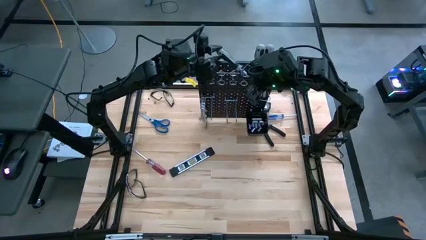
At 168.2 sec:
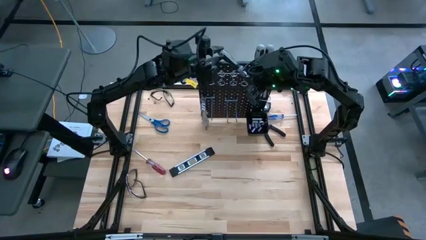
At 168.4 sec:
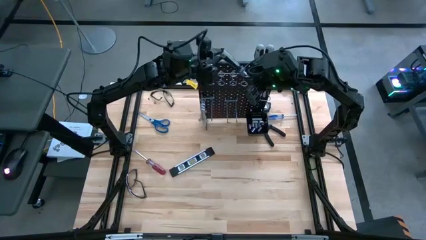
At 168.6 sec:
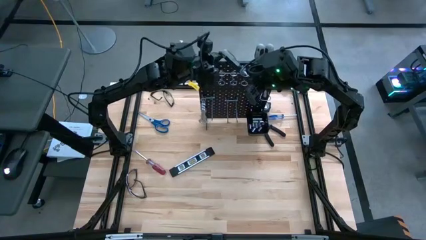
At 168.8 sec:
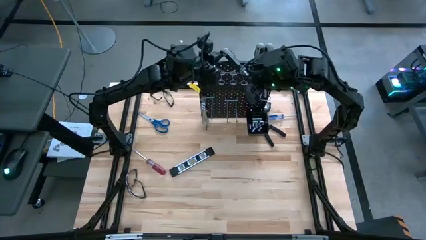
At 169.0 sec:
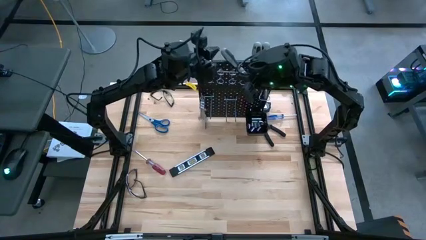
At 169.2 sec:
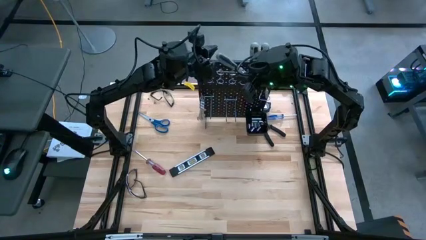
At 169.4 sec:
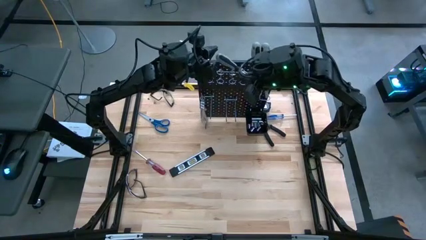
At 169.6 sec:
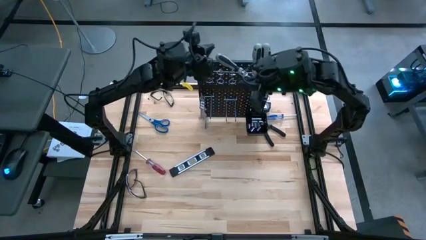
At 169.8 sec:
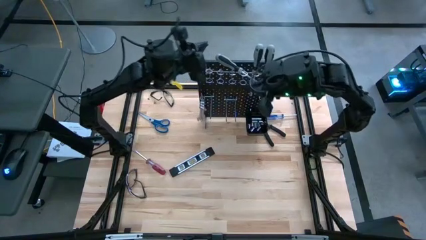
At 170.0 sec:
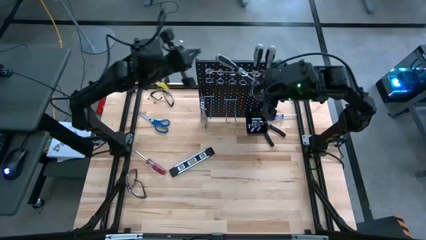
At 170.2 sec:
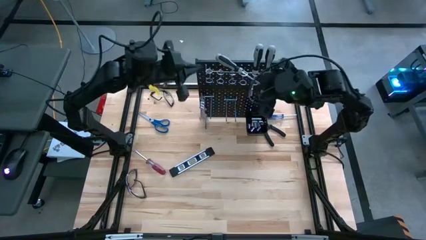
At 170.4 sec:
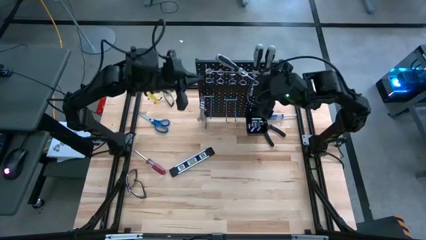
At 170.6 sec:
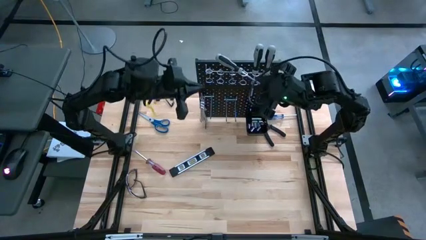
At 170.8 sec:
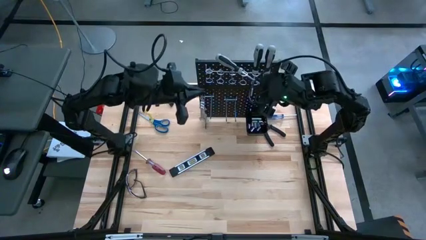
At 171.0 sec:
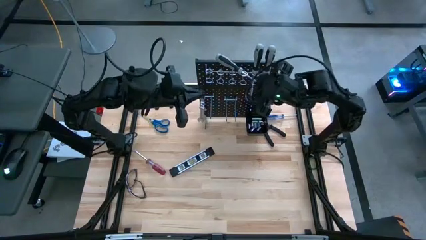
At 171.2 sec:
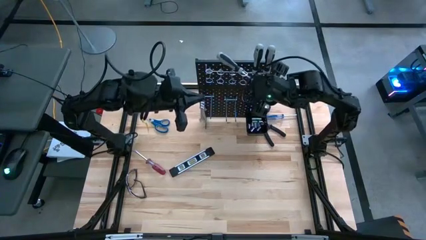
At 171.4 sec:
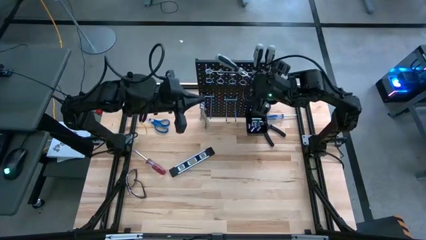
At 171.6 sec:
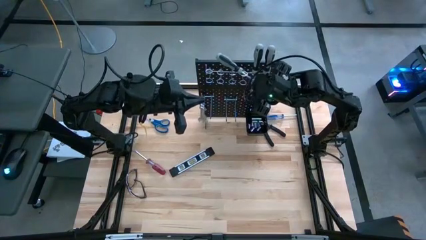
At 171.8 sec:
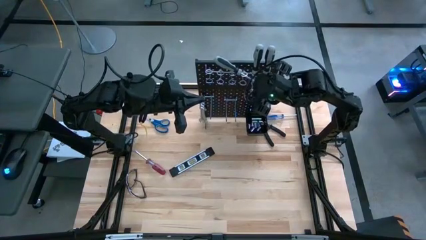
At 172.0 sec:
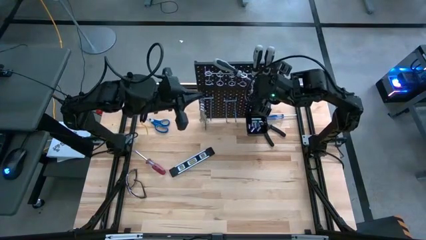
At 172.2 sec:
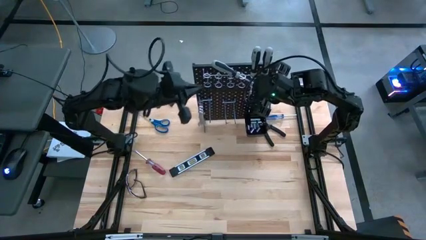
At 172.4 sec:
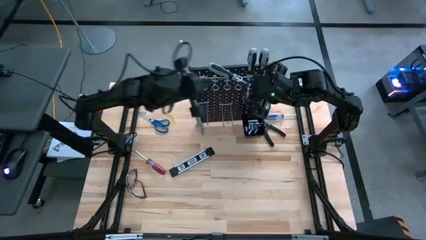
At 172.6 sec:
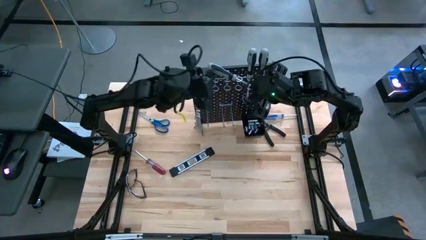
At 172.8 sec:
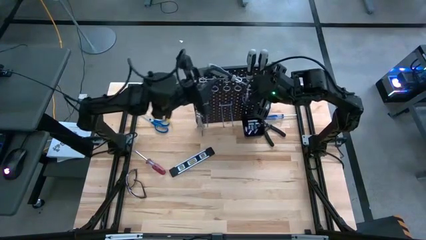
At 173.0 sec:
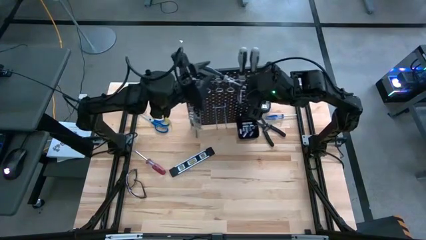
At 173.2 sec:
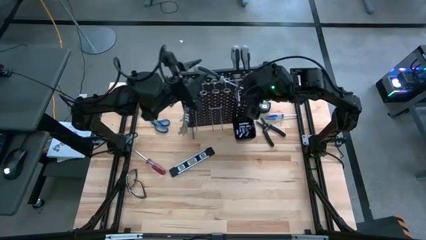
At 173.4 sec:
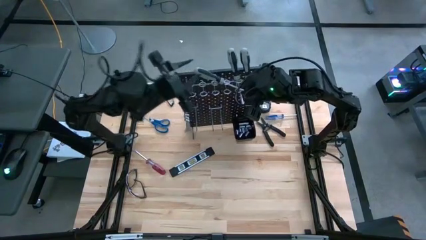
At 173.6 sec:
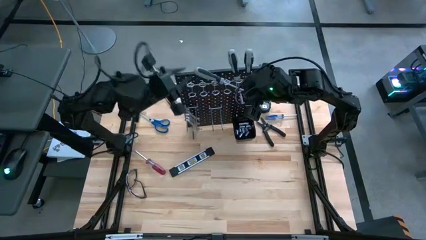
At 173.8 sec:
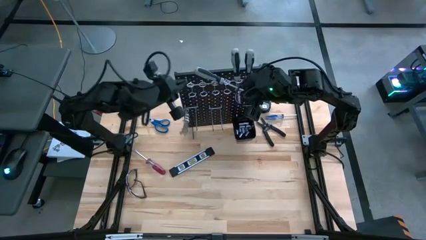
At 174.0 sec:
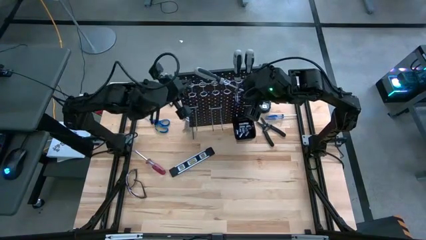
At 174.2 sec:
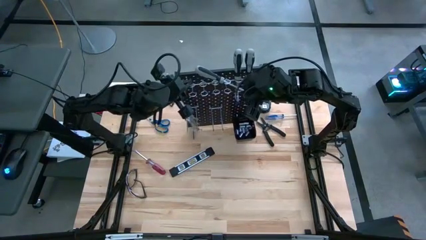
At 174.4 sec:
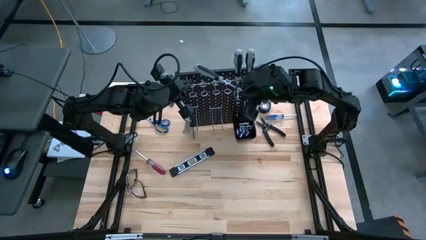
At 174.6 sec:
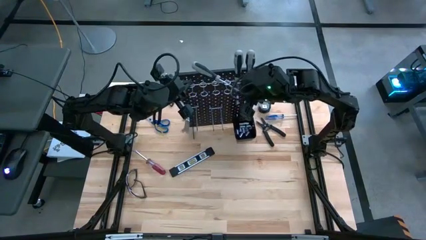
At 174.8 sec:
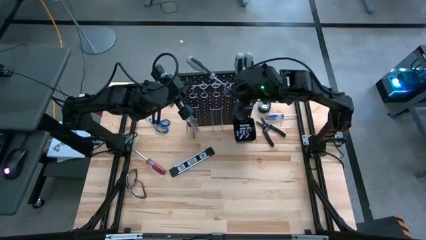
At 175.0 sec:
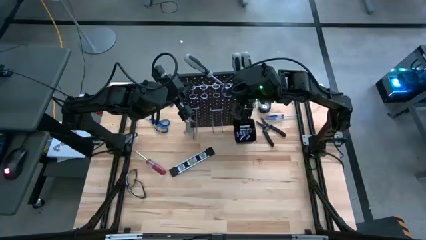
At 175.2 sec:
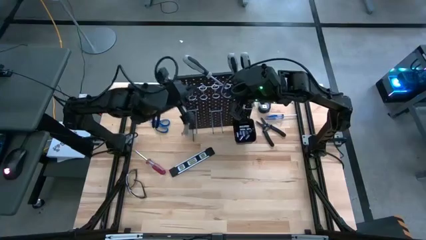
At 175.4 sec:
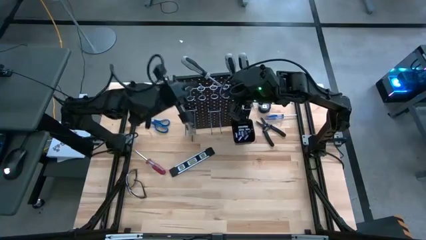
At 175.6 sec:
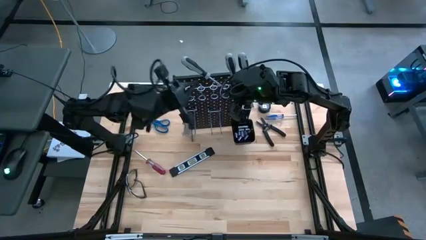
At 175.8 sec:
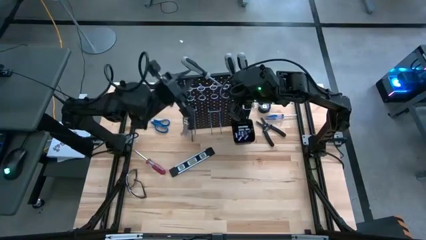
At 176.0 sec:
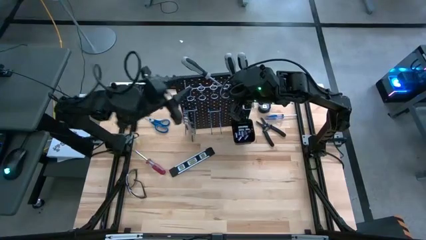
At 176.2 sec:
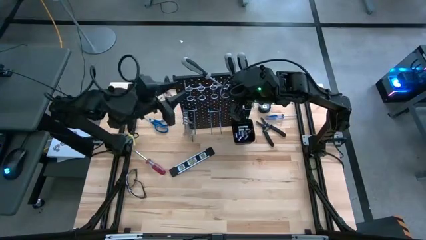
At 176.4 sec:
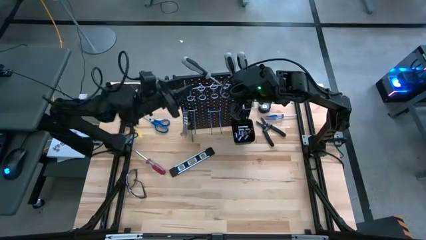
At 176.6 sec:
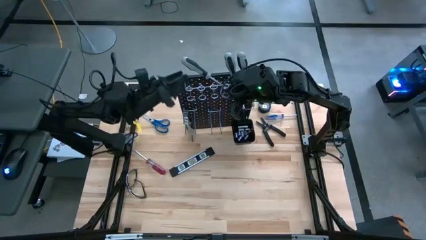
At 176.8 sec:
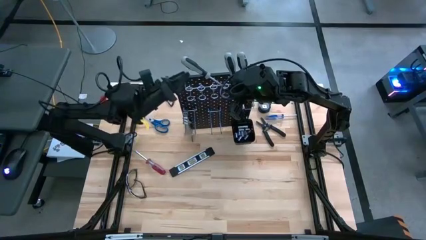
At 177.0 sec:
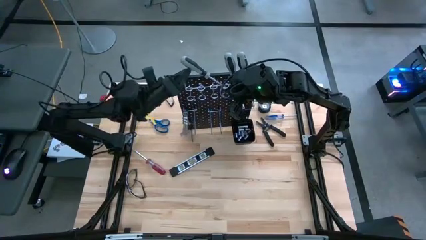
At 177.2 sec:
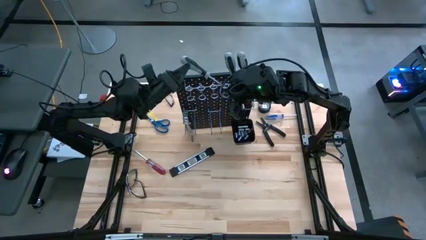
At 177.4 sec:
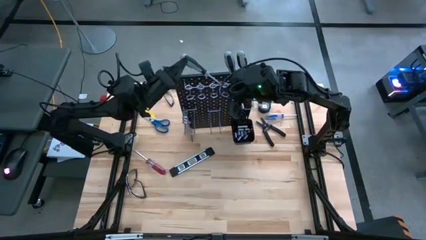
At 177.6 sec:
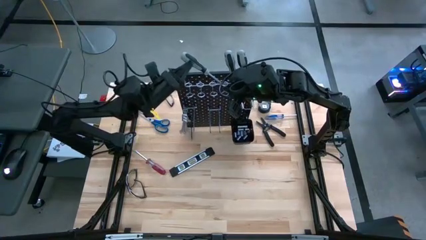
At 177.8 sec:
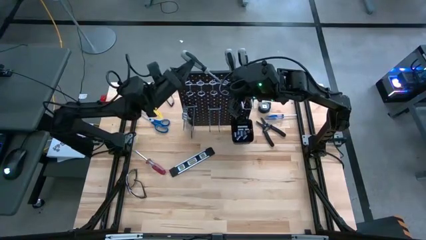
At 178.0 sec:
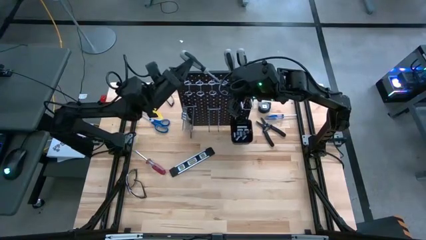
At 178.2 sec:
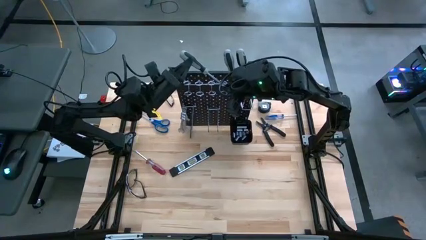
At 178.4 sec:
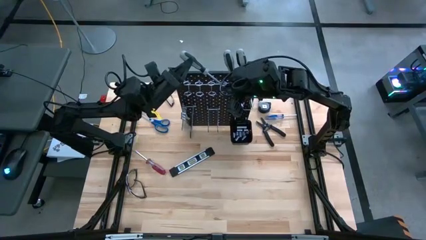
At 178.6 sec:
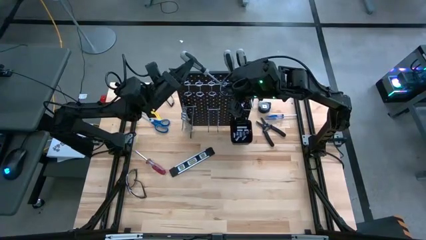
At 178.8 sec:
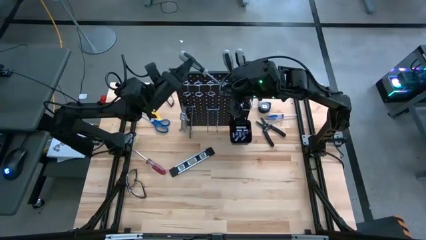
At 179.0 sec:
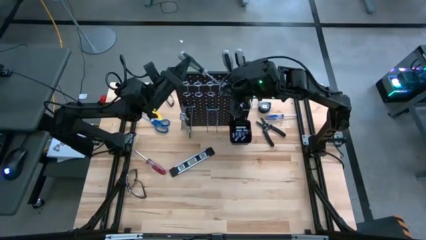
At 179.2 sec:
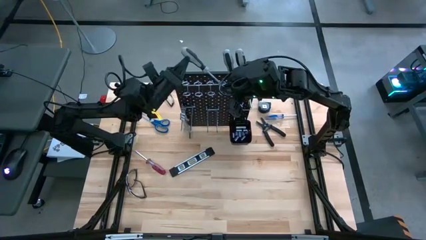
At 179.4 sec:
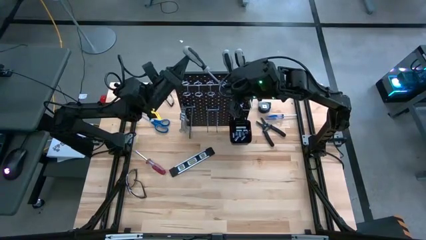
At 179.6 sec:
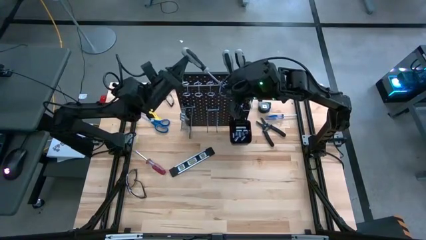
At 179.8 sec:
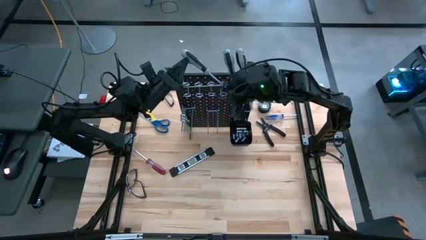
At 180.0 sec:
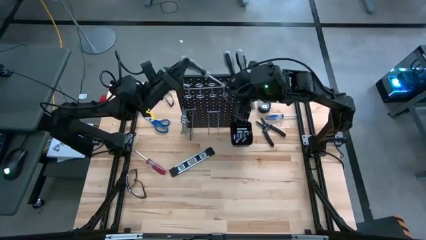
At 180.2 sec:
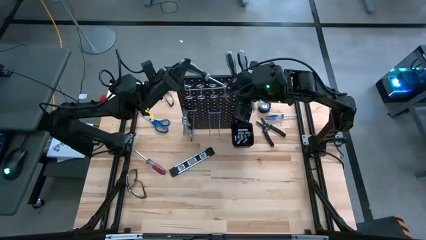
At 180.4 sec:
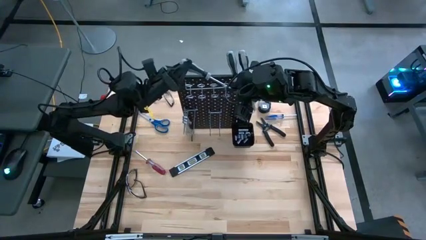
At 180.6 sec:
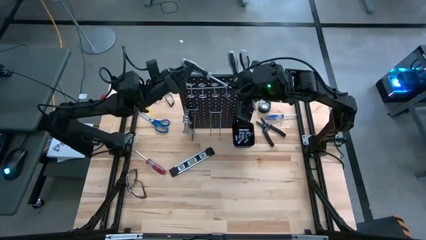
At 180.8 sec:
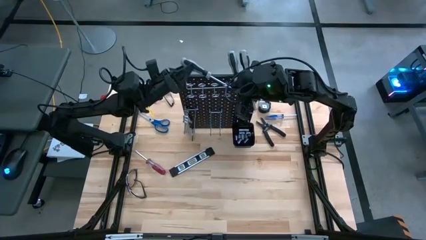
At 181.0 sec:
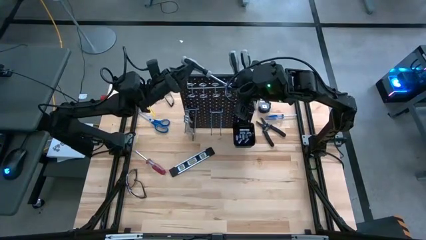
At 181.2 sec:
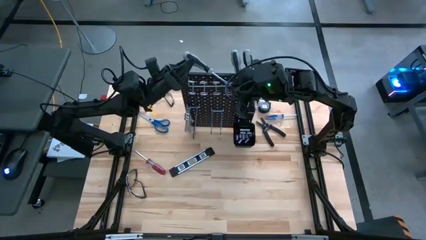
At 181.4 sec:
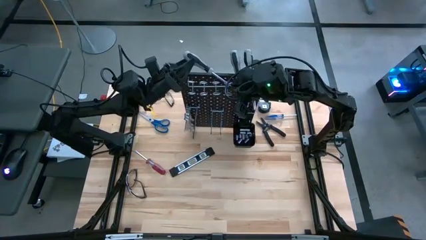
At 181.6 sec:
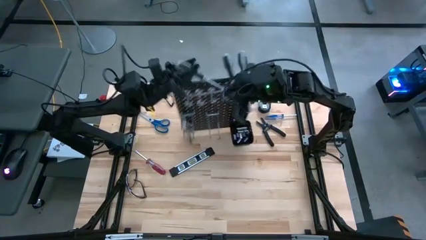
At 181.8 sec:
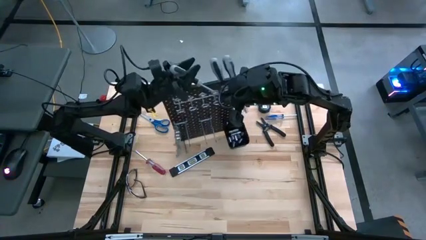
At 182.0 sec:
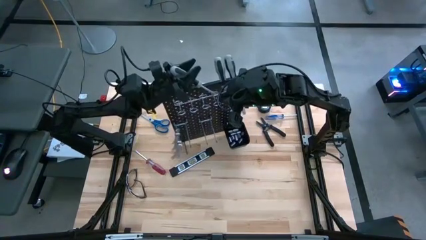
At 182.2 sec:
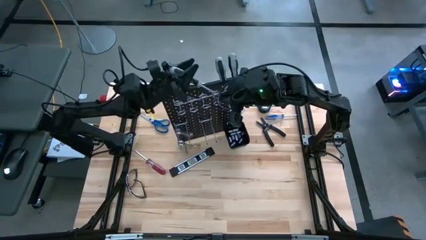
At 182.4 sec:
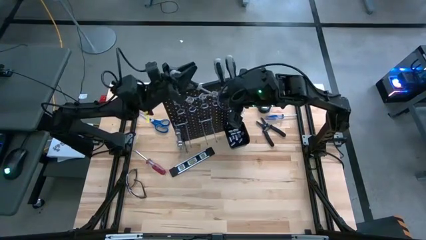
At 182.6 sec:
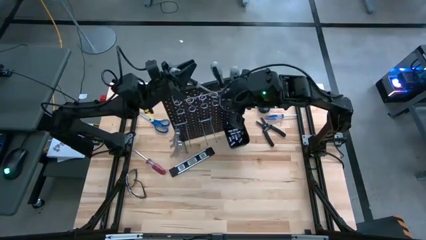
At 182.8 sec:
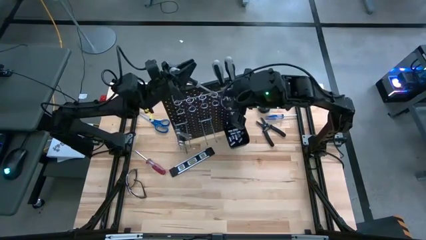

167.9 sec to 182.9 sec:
Task: Hang tools onto peg board
Hang the gray screwdriver on the pegboard
